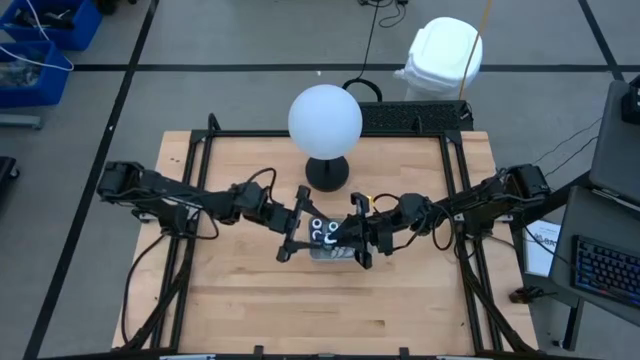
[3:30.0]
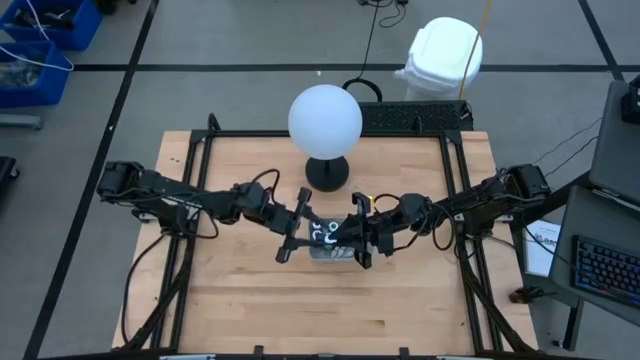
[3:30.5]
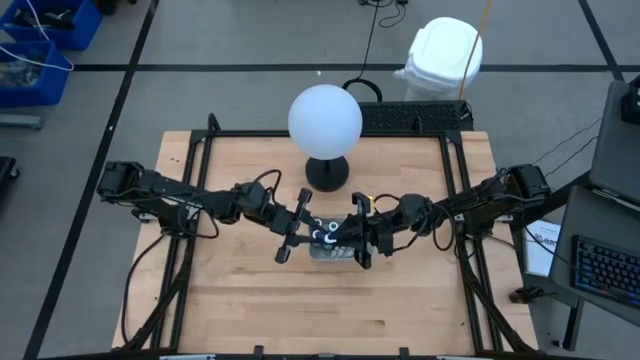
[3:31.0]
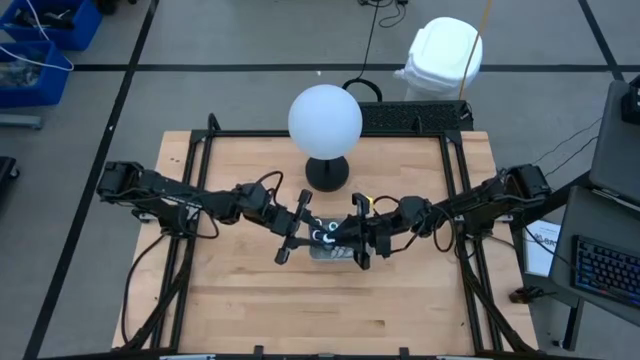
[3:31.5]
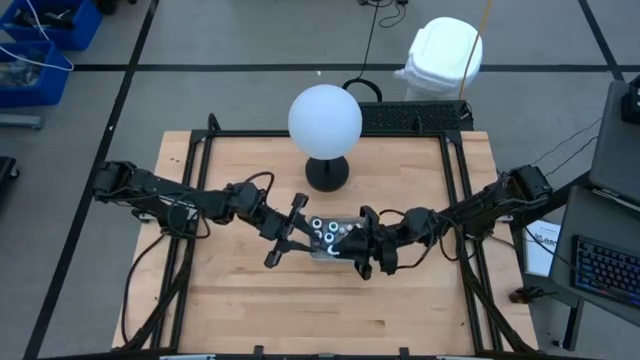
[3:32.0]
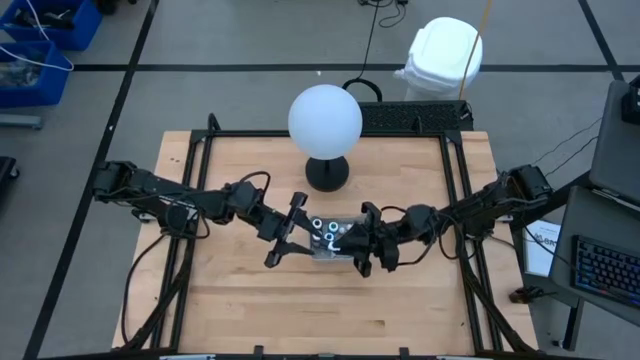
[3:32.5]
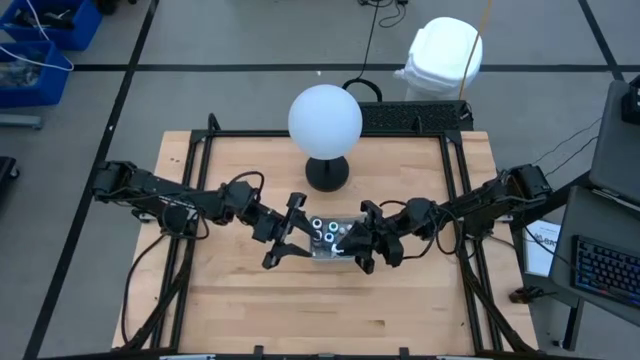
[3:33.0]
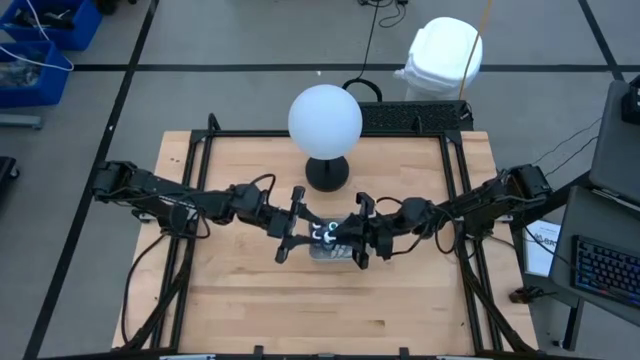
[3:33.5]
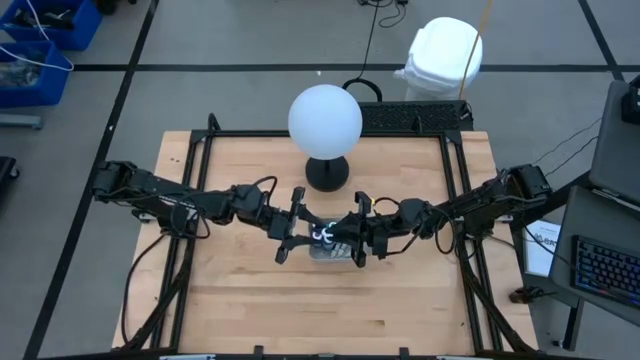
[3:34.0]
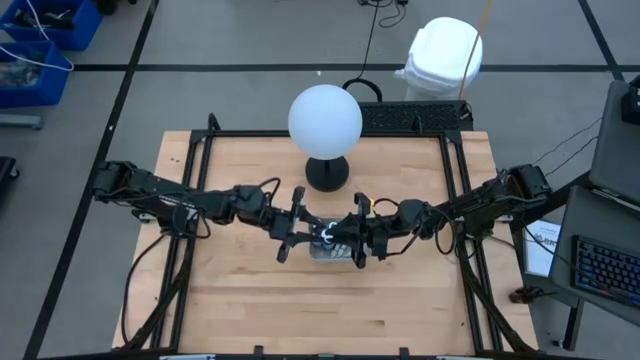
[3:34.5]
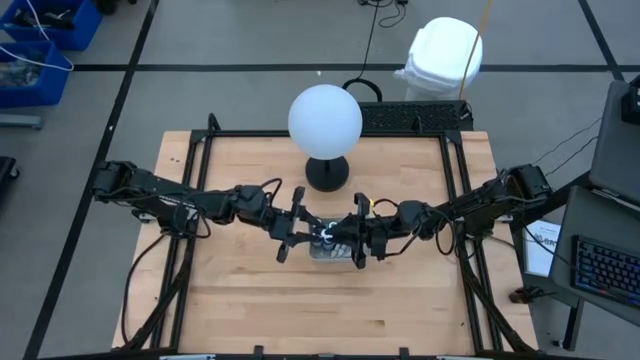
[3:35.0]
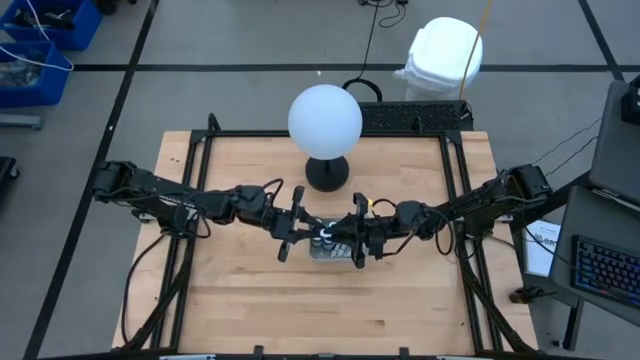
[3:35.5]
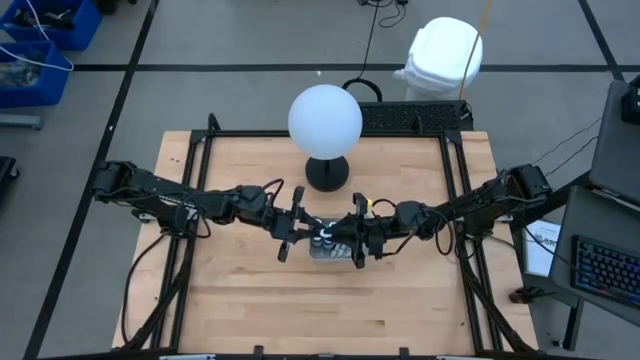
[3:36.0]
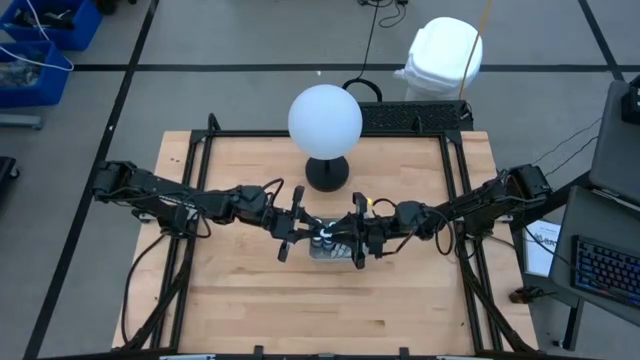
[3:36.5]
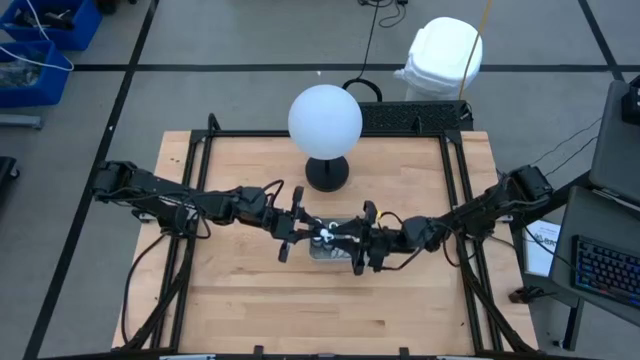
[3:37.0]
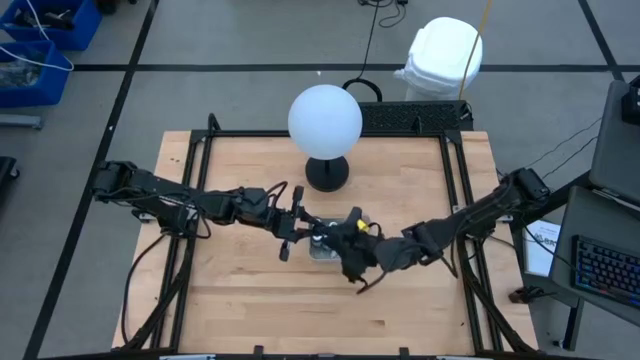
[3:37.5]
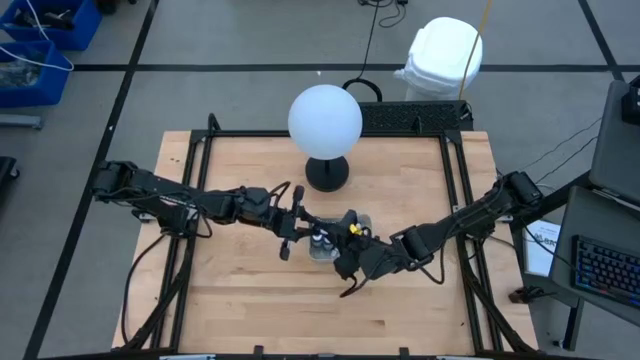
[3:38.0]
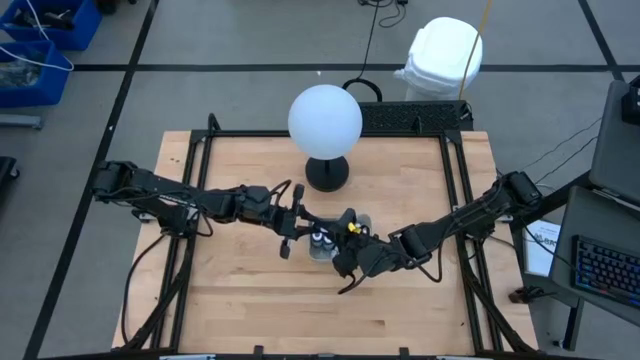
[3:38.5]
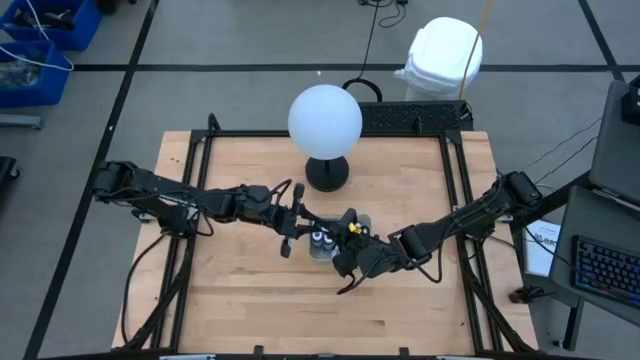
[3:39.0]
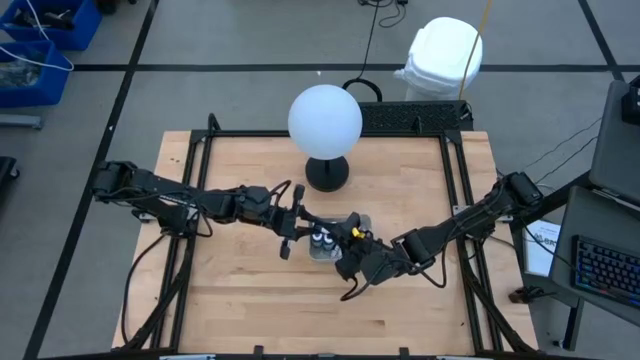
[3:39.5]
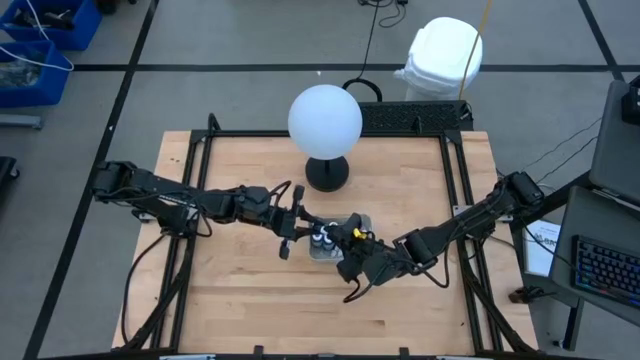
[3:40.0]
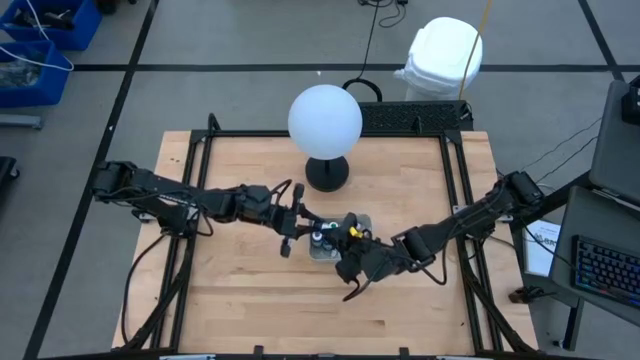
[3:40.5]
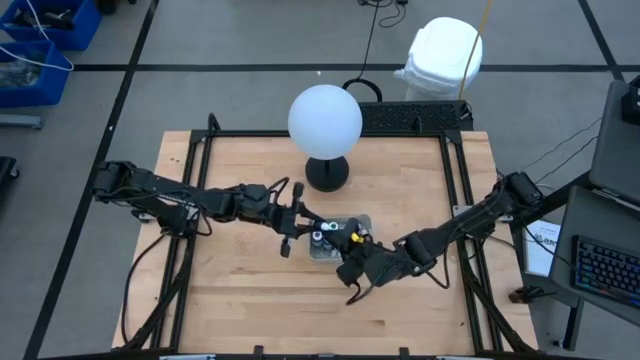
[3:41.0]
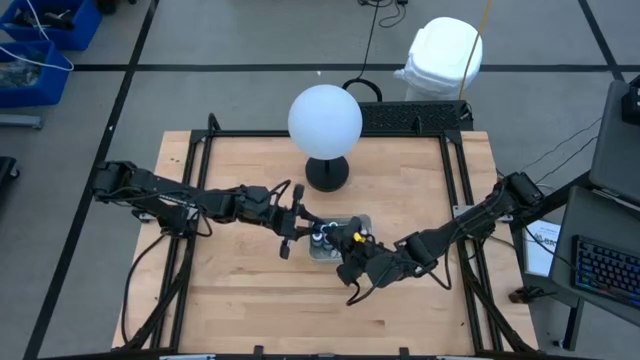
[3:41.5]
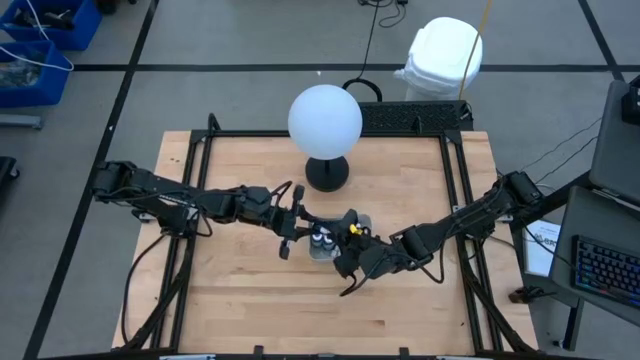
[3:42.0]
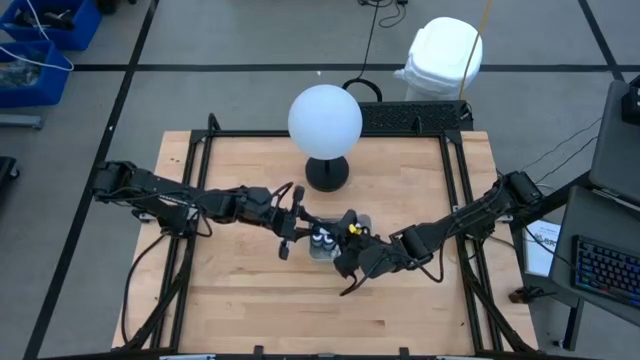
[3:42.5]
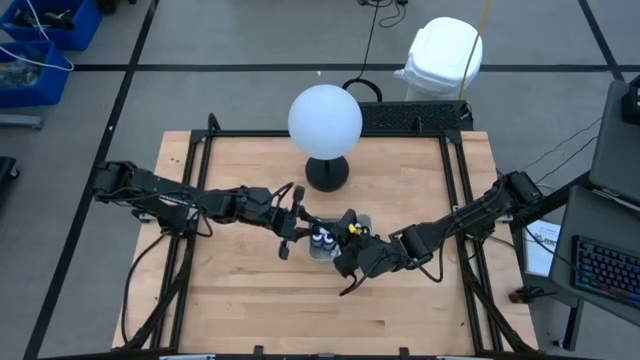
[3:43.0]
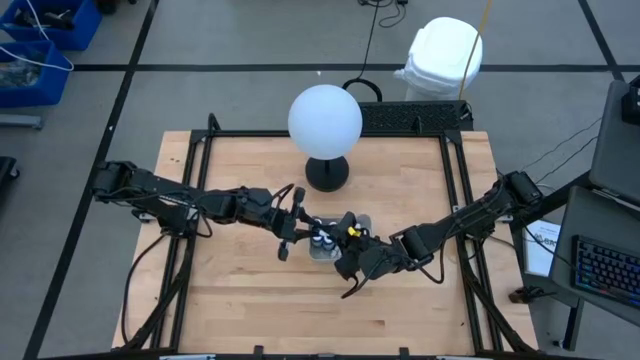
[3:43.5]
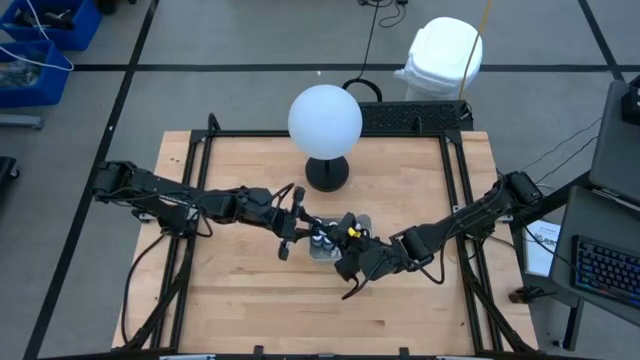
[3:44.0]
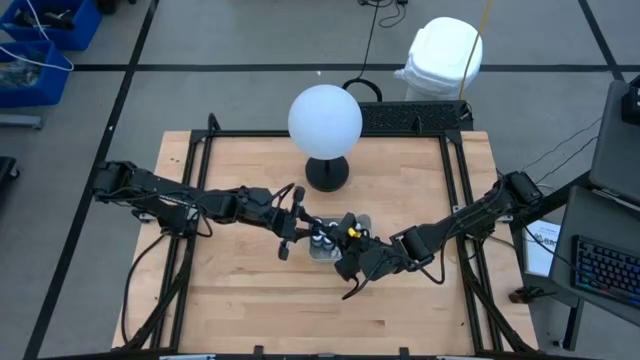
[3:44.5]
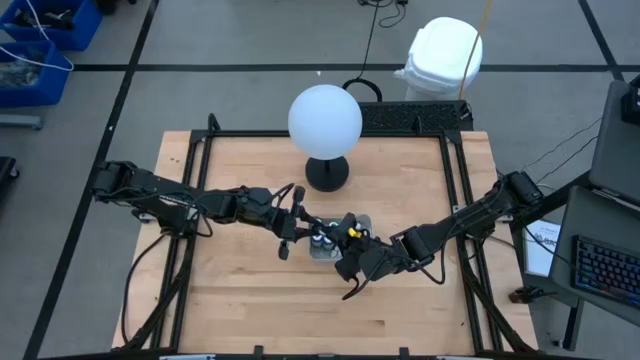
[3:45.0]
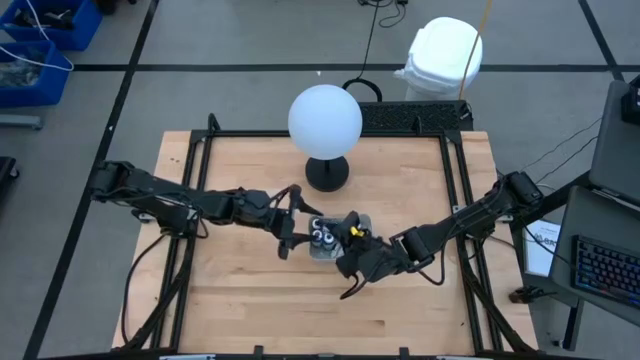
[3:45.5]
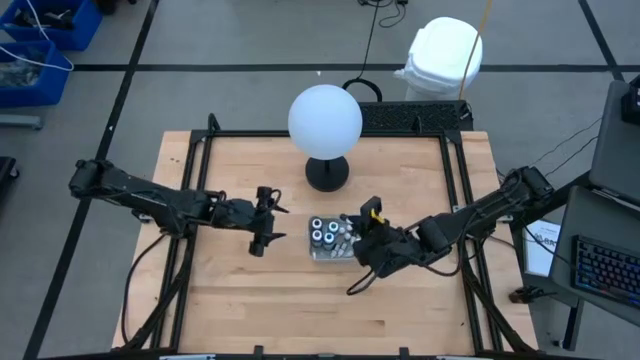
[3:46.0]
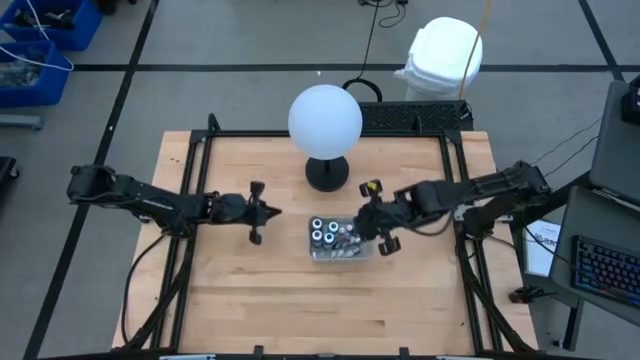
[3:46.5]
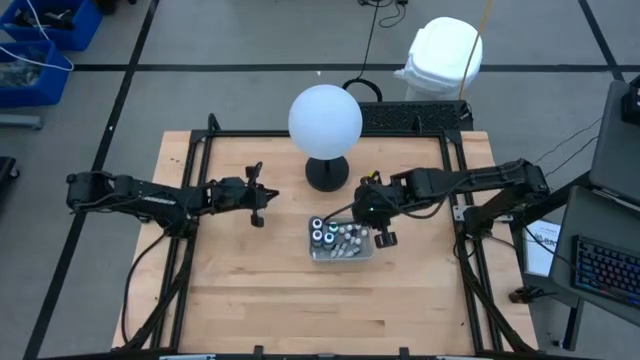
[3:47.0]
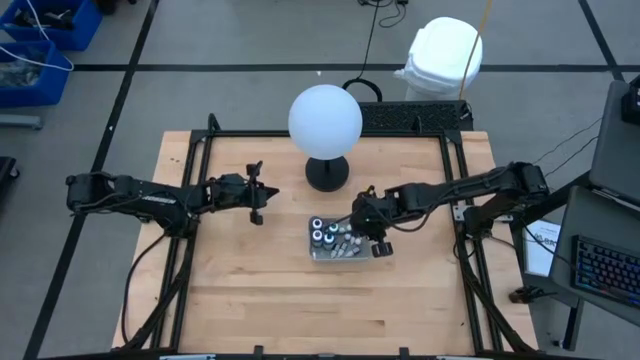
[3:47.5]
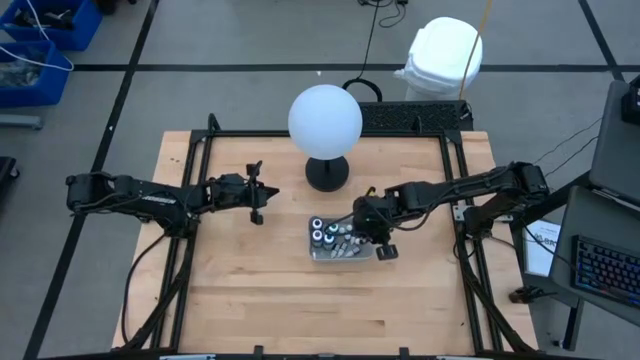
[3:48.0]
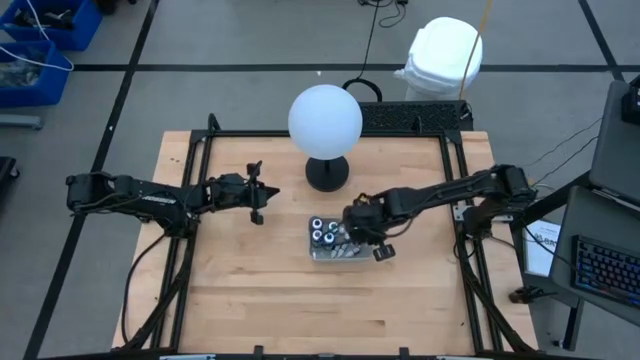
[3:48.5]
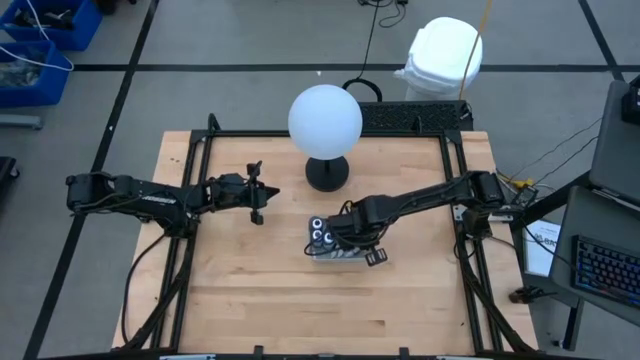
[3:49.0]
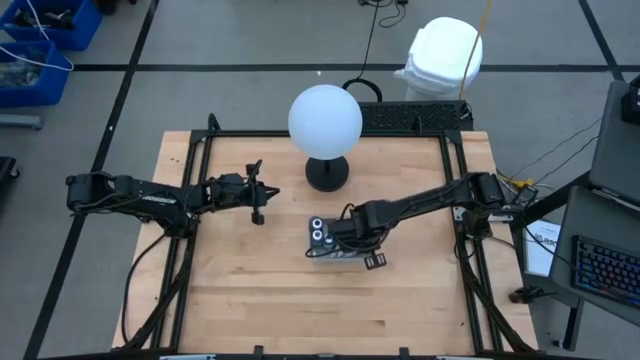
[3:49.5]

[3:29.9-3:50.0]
Task: Pick & Place food coloring
Put the small blue food coloring bottle into the gray bin
